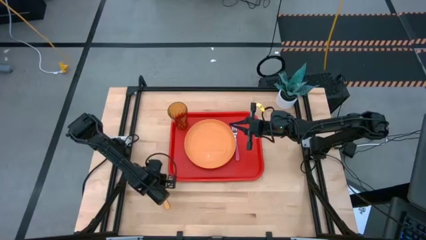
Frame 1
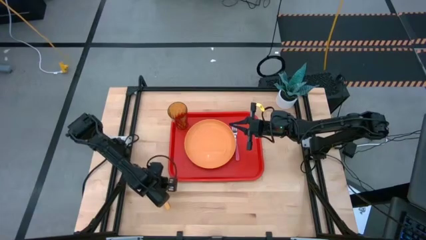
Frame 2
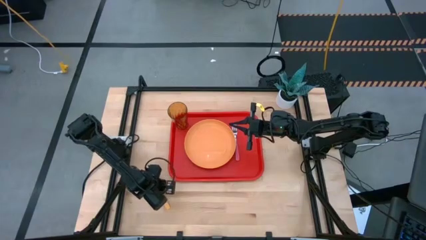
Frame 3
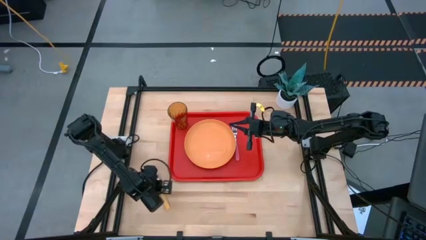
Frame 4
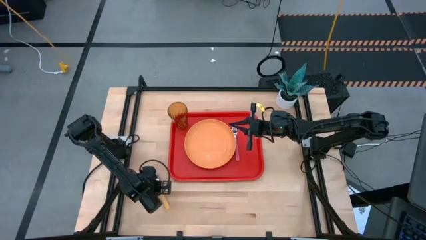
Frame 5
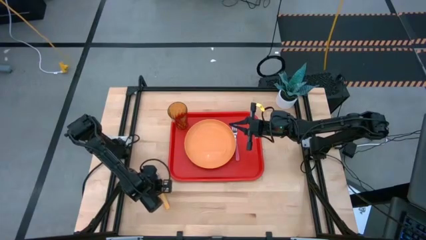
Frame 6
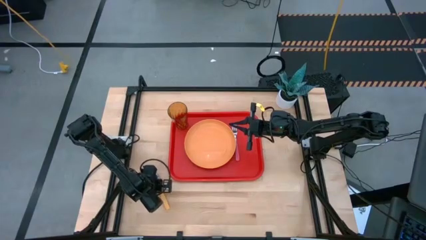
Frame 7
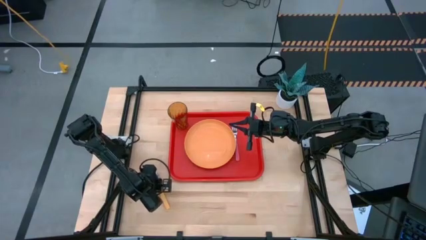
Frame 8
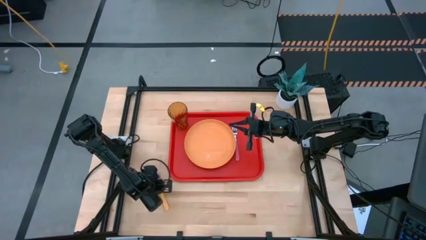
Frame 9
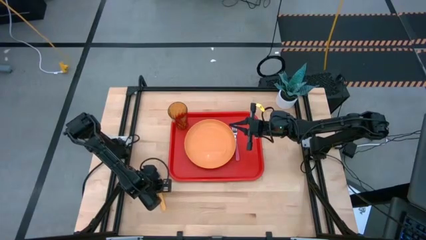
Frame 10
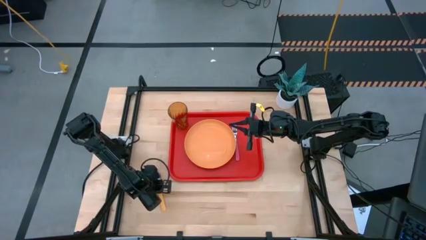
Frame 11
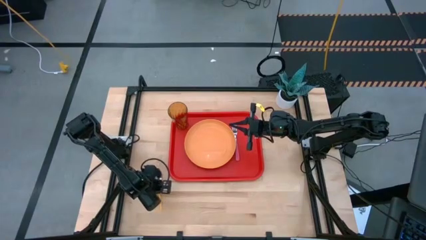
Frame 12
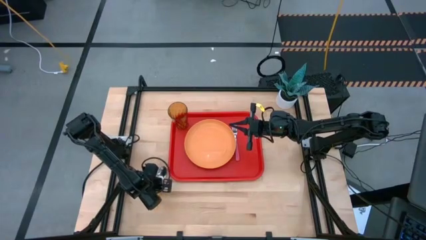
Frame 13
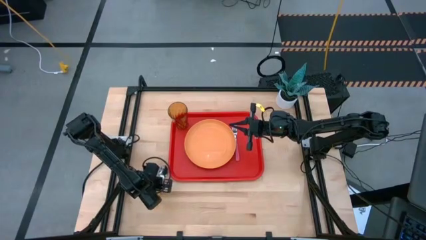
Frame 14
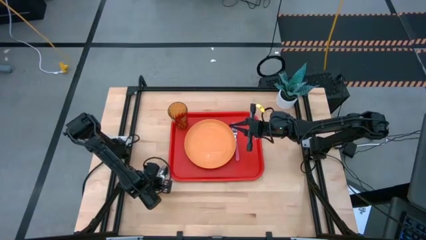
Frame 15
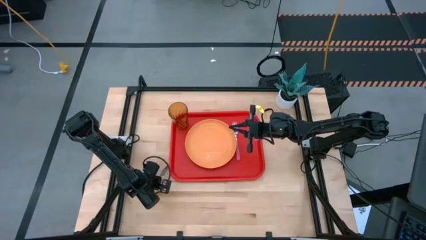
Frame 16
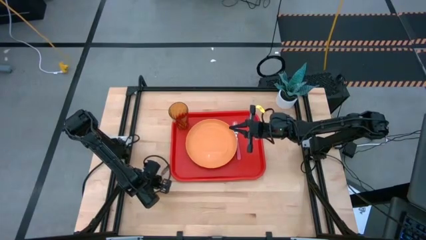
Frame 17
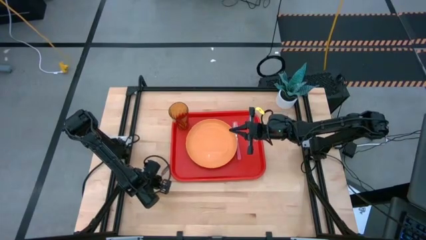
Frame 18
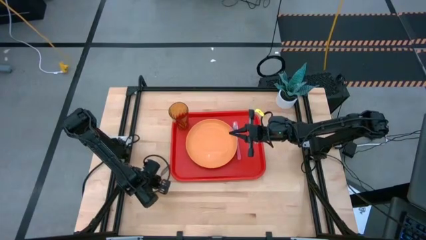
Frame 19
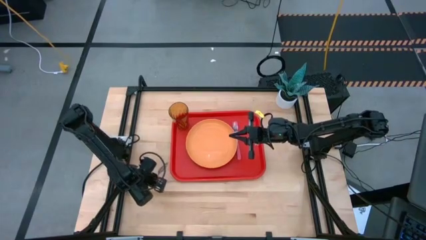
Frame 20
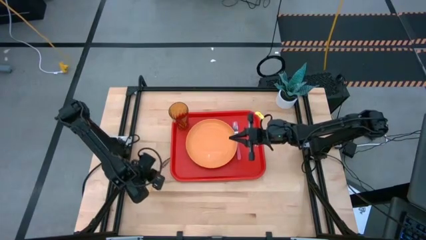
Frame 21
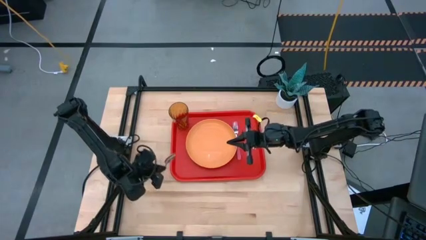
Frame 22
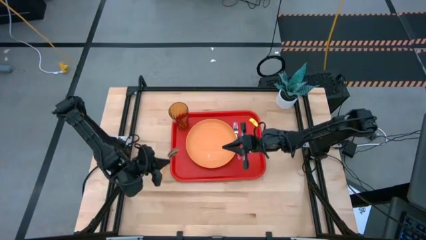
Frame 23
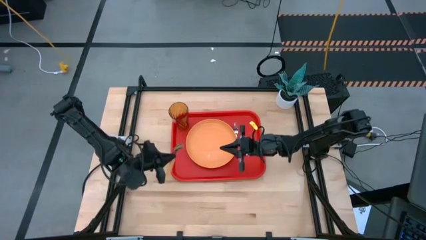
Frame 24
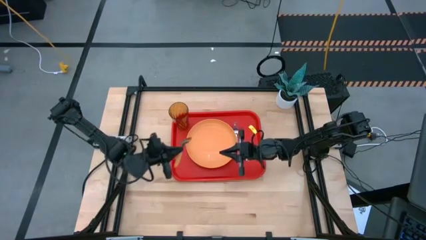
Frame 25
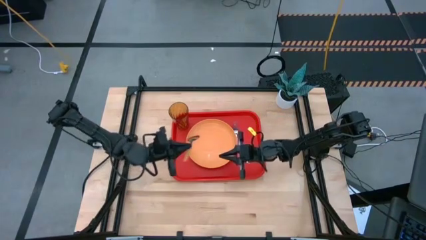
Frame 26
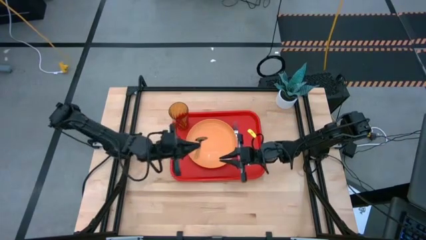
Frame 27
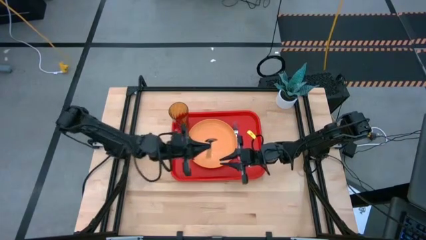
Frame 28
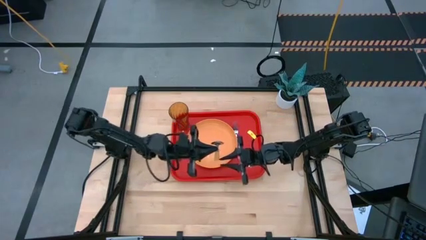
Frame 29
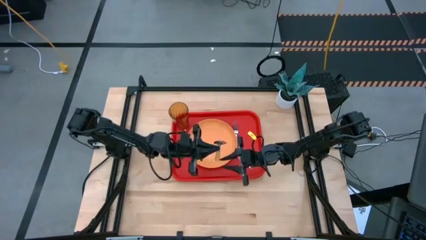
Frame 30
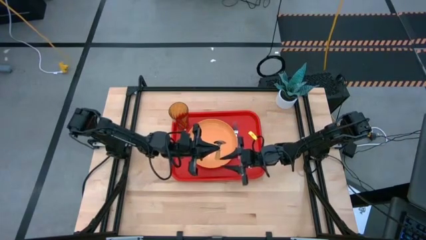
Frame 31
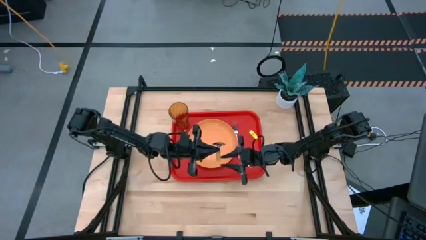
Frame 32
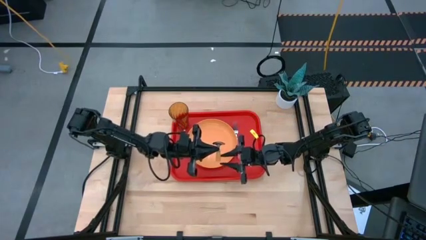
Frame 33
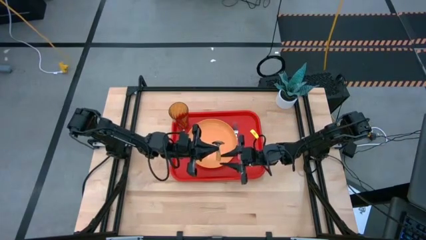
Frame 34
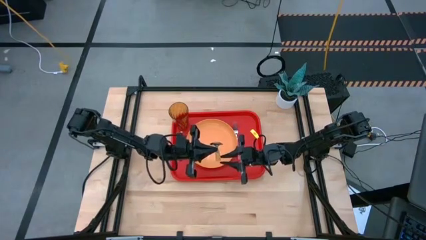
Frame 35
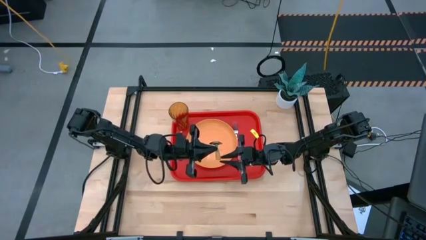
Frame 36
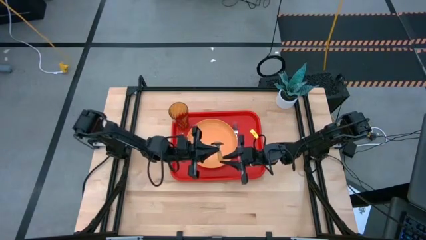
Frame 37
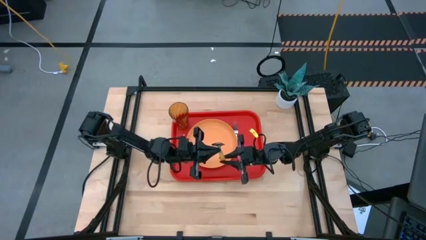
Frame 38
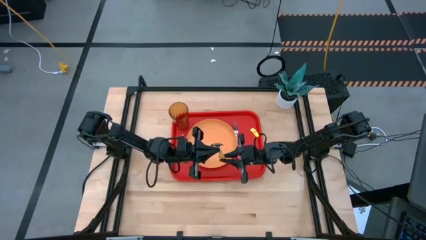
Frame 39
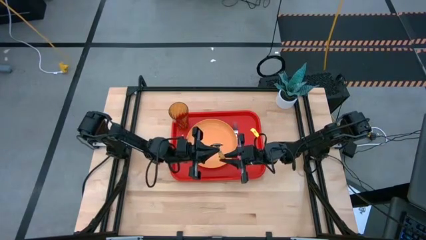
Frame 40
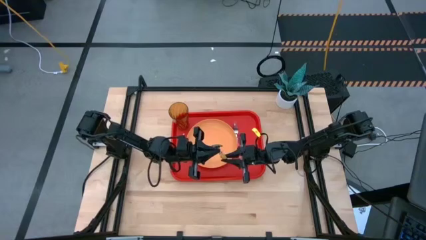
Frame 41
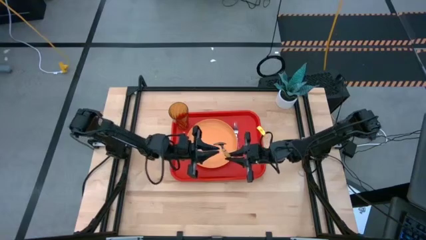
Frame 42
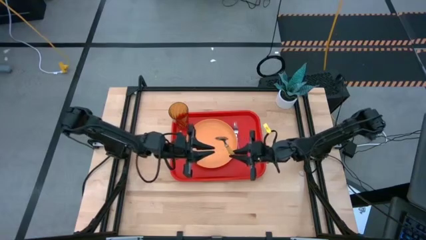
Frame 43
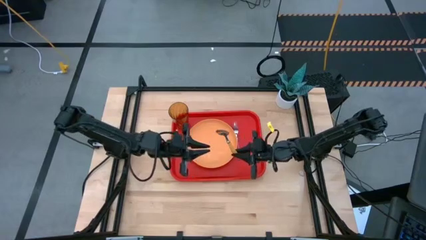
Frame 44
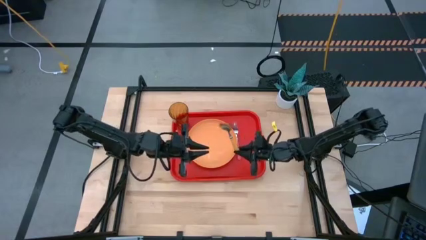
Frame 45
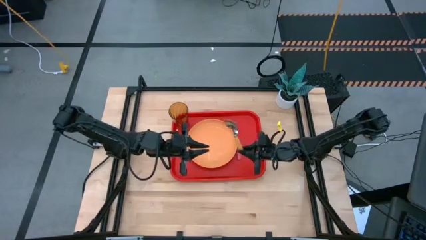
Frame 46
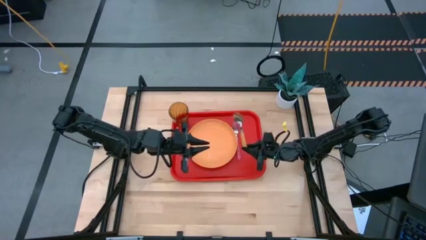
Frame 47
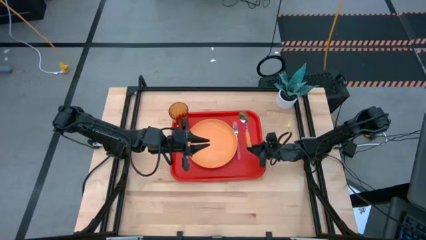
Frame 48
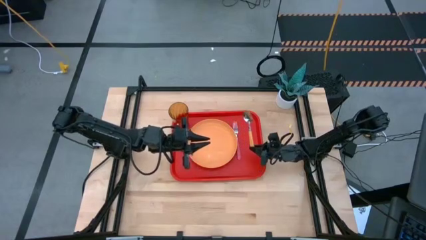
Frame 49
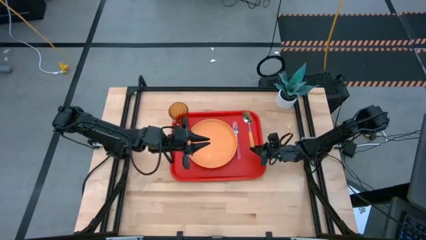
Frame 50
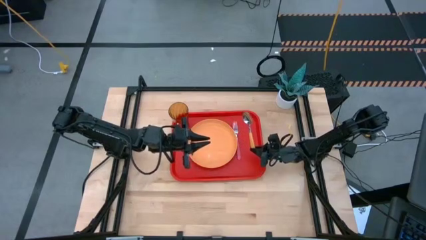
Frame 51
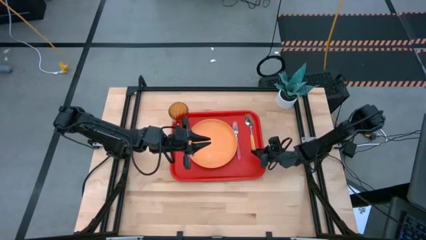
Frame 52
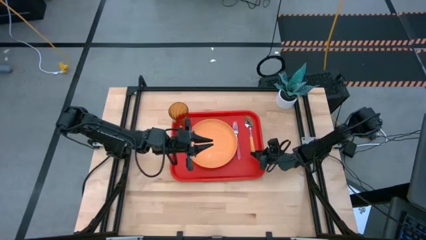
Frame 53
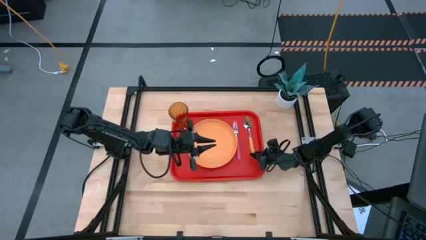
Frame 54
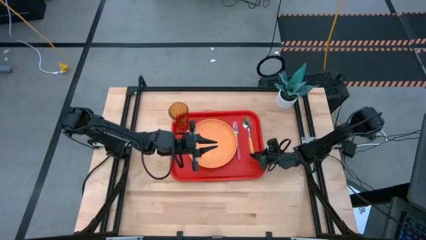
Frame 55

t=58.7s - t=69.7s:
Task: Pick and place plate/cup/fork/spoon on tray
Put the yellow spoon on the red tray to the right of the pink fork

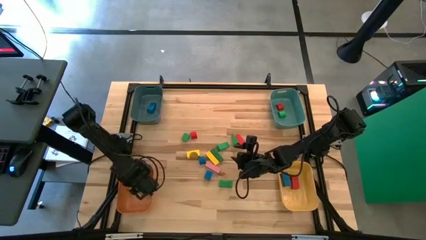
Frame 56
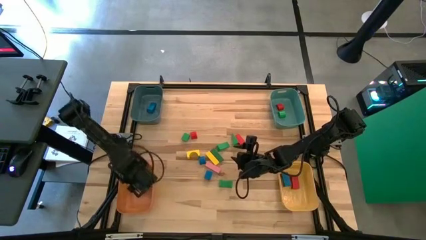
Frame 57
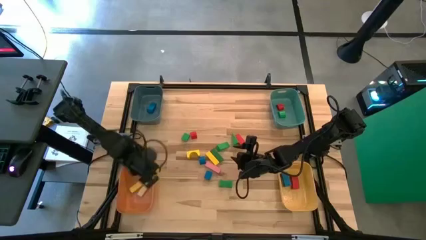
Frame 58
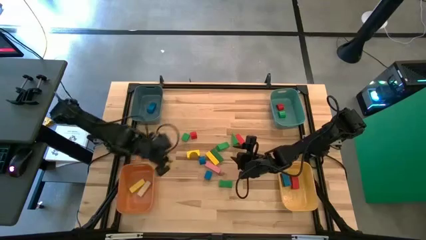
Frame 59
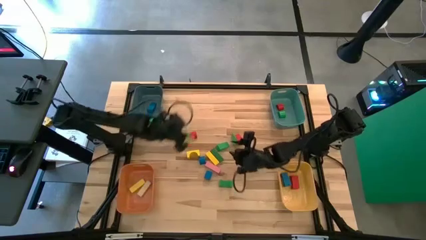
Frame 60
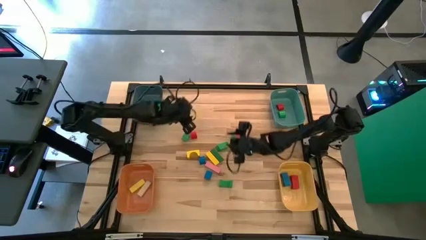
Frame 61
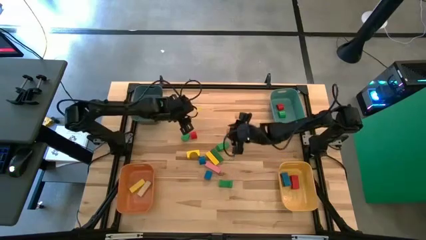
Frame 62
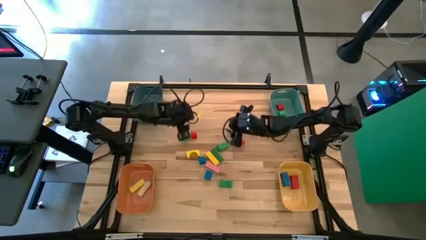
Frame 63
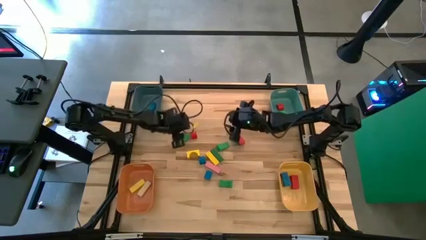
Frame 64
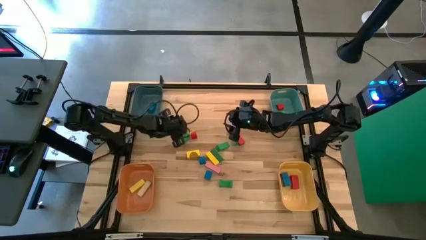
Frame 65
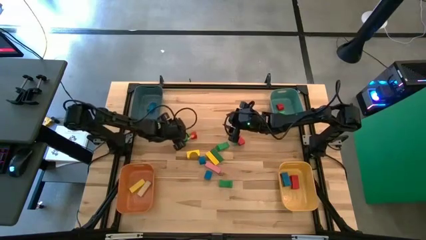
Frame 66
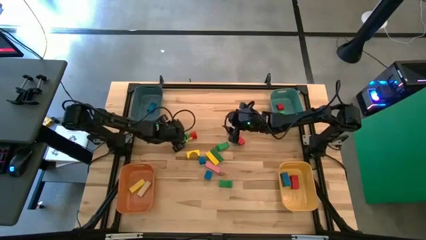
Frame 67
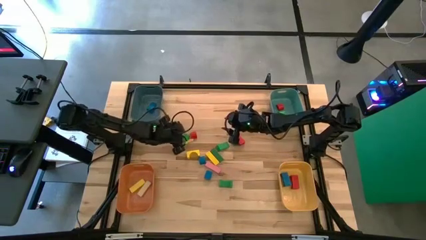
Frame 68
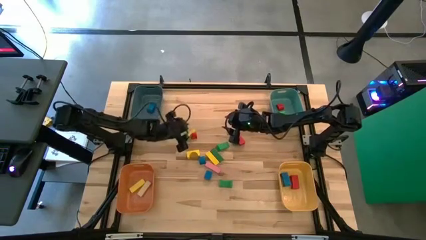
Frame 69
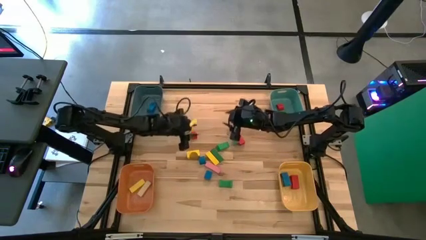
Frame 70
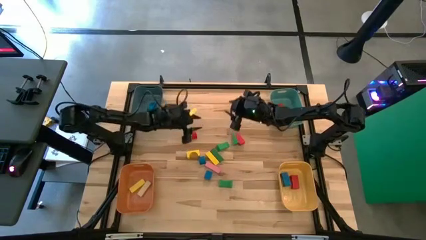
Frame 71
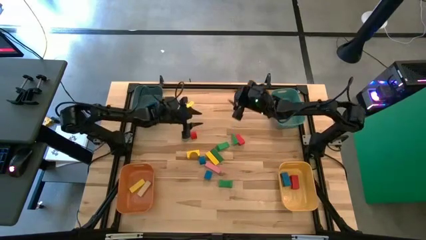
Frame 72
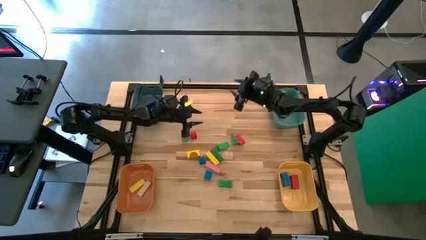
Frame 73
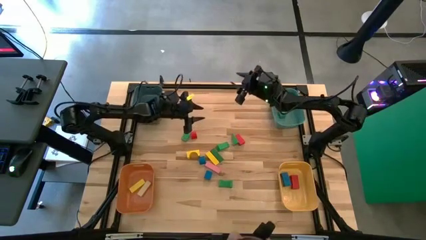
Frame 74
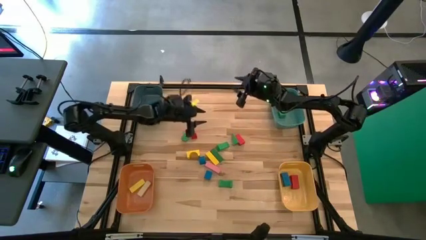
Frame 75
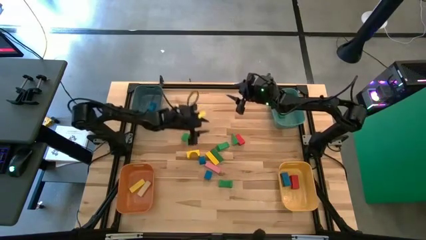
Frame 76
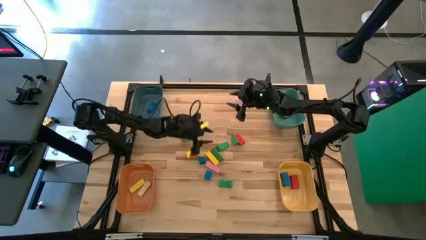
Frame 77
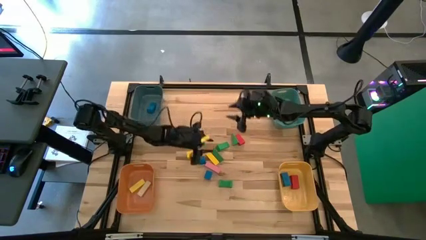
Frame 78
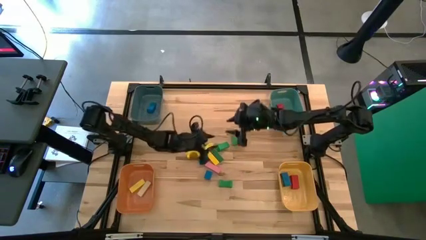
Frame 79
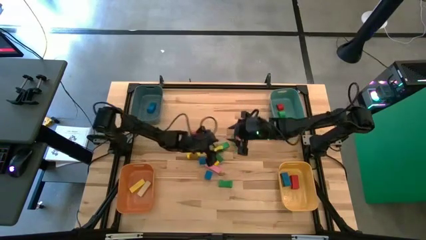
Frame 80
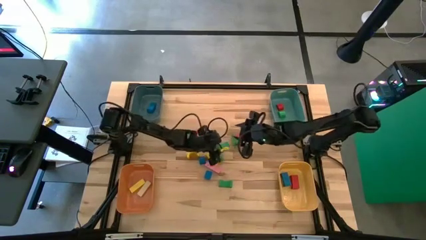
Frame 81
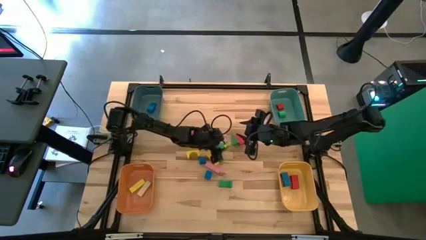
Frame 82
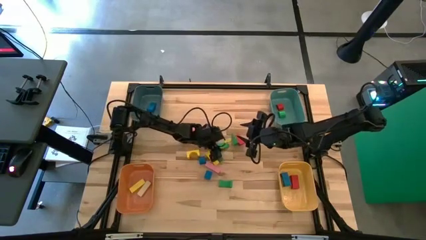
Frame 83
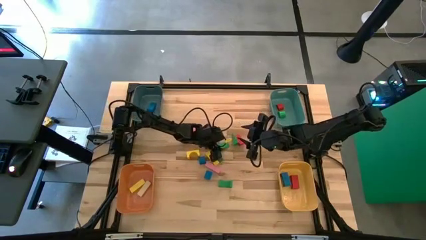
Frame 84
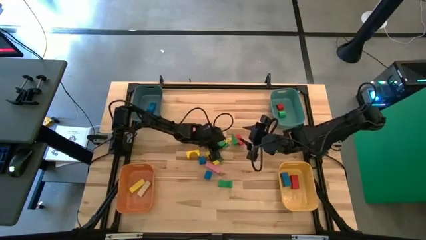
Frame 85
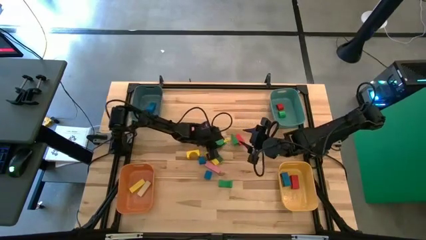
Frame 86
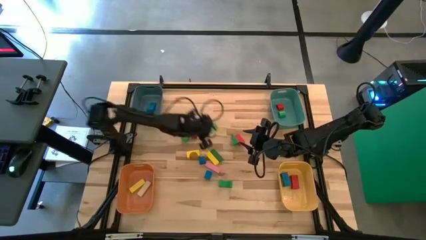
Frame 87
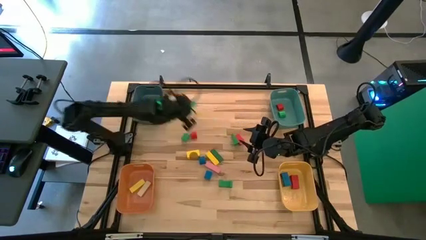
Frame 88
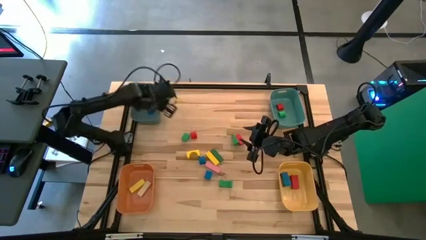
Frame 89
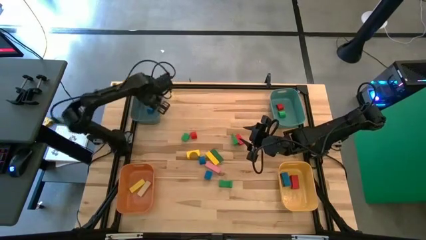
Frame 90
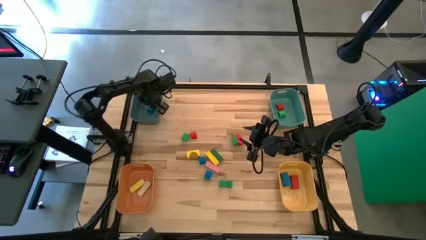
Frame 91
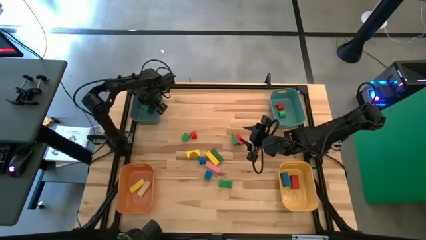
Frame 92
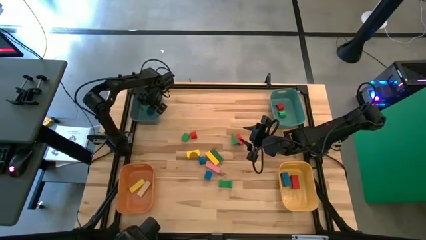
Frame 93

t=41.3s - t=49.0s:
Task: Sort blocks by size
Put the green triangular block into the blue bin
